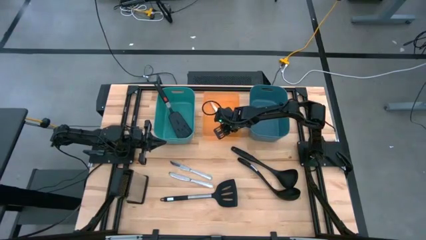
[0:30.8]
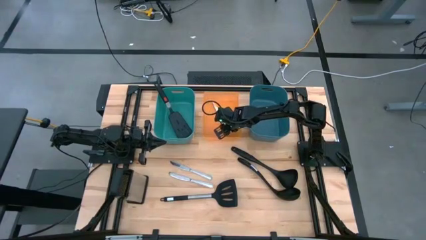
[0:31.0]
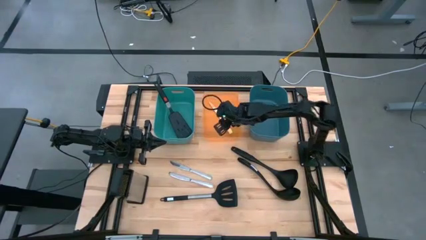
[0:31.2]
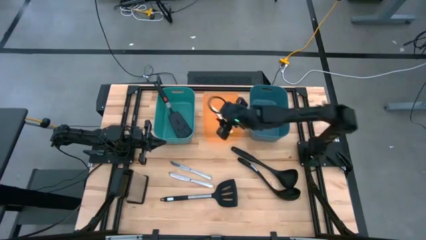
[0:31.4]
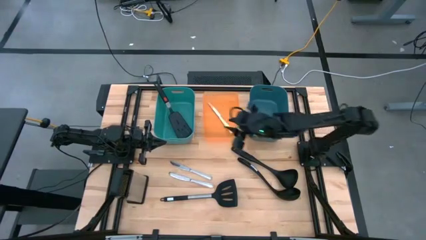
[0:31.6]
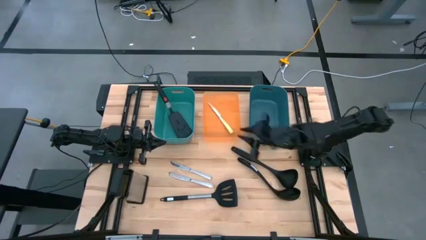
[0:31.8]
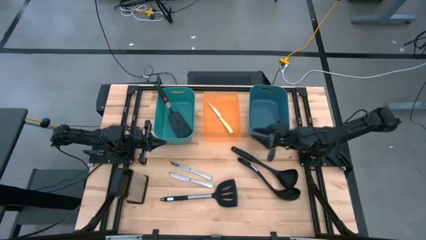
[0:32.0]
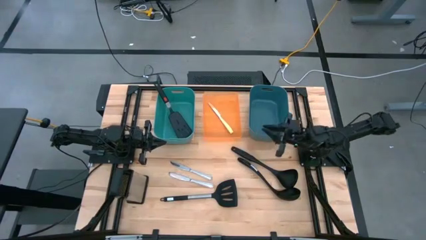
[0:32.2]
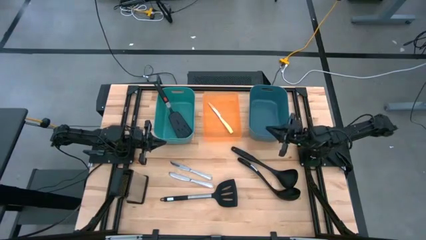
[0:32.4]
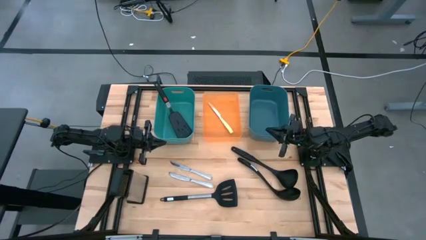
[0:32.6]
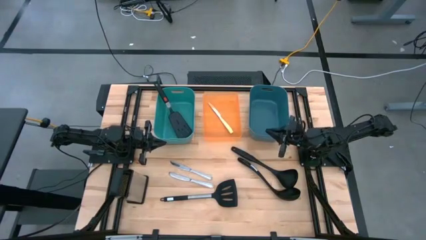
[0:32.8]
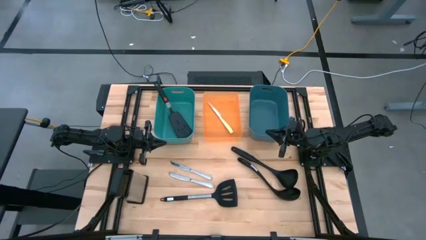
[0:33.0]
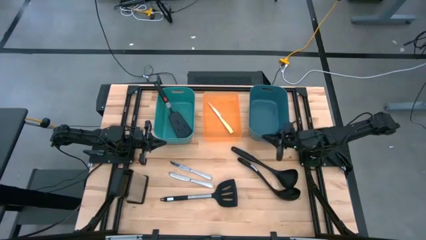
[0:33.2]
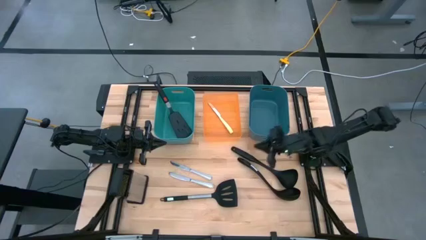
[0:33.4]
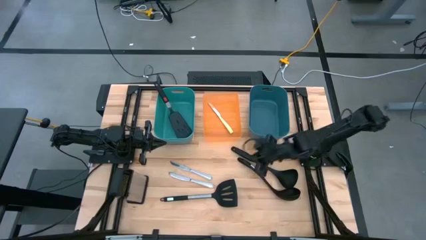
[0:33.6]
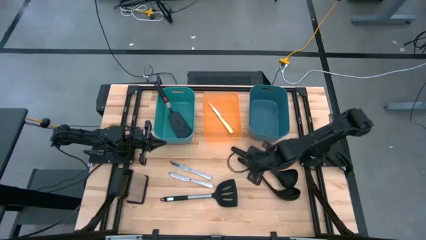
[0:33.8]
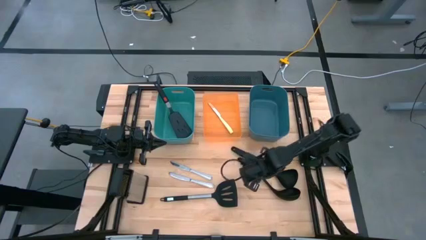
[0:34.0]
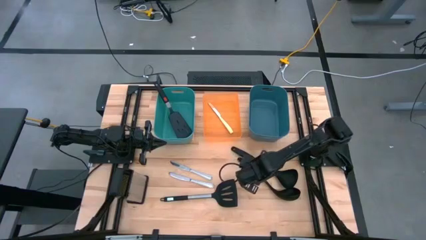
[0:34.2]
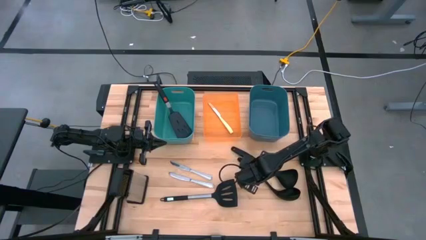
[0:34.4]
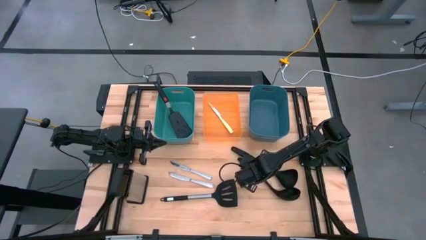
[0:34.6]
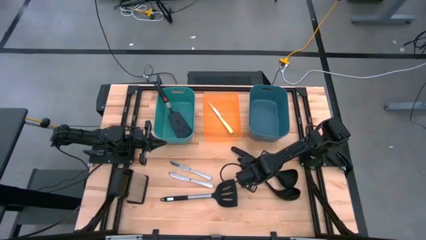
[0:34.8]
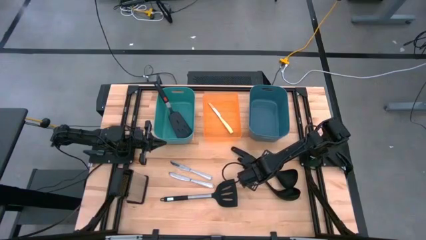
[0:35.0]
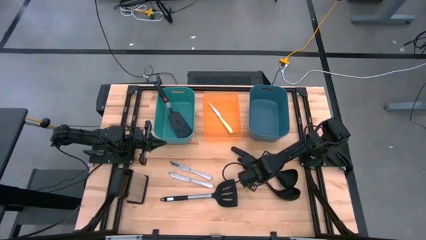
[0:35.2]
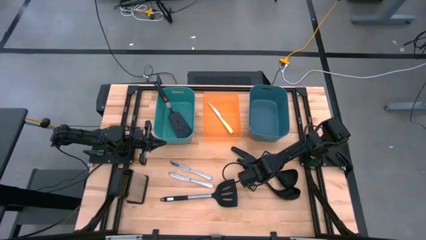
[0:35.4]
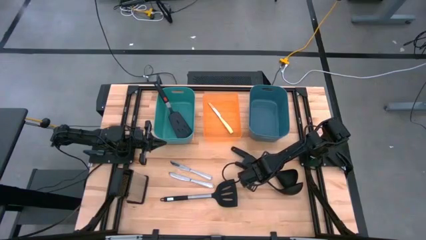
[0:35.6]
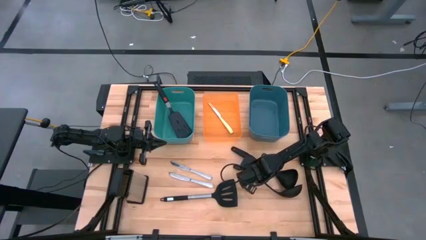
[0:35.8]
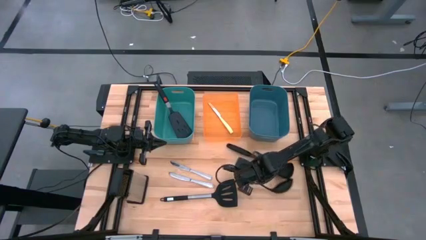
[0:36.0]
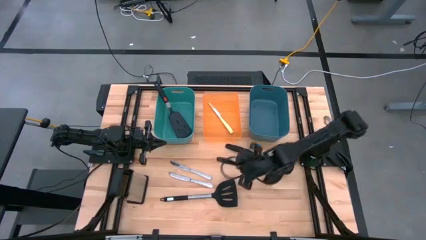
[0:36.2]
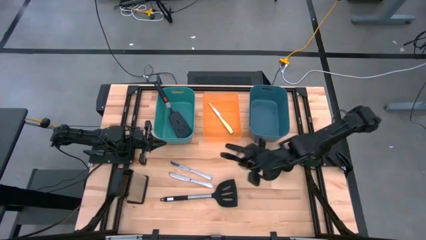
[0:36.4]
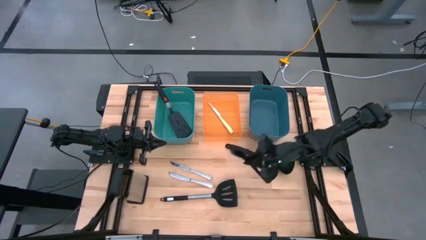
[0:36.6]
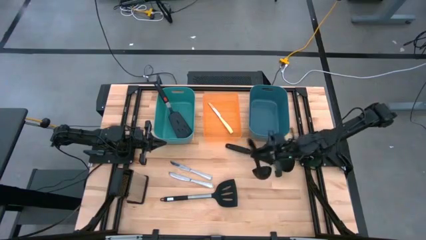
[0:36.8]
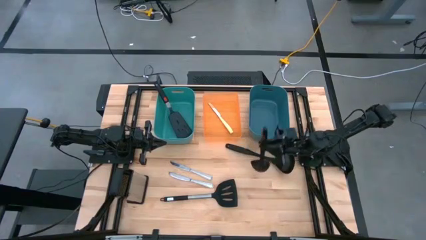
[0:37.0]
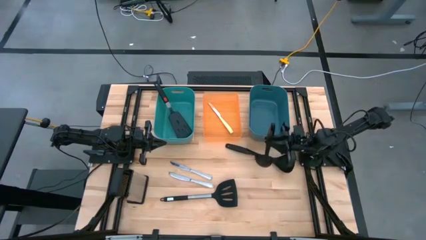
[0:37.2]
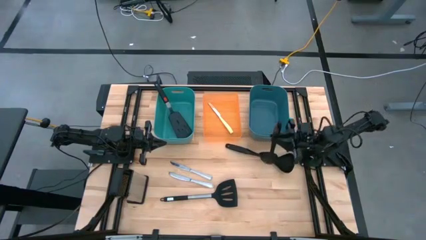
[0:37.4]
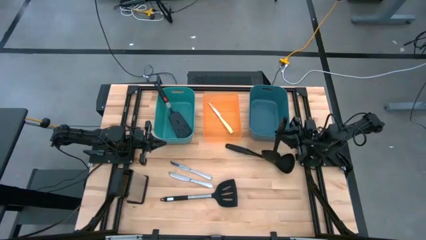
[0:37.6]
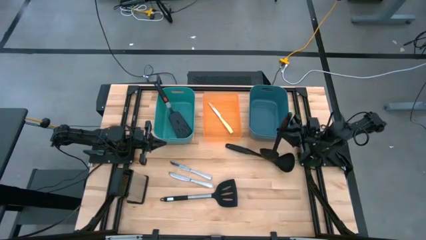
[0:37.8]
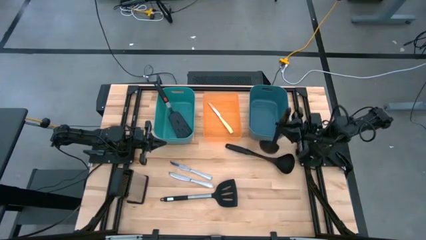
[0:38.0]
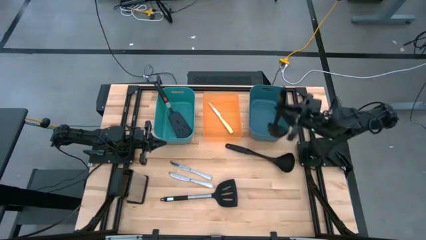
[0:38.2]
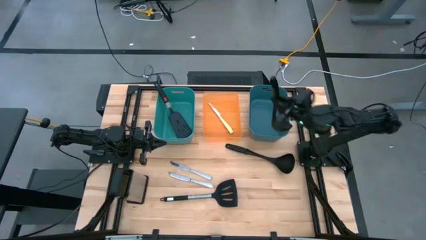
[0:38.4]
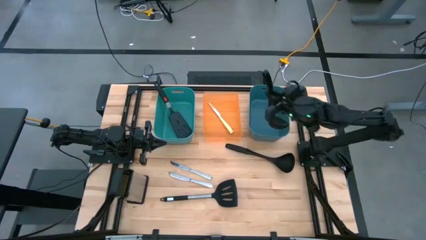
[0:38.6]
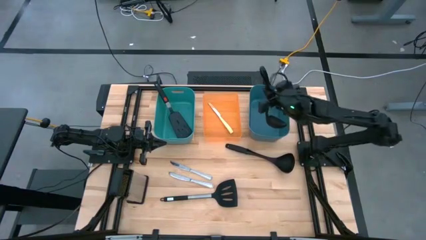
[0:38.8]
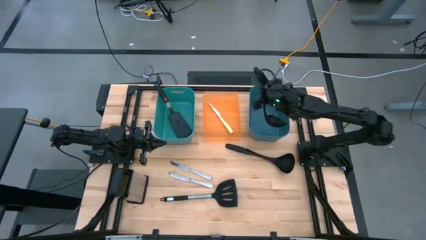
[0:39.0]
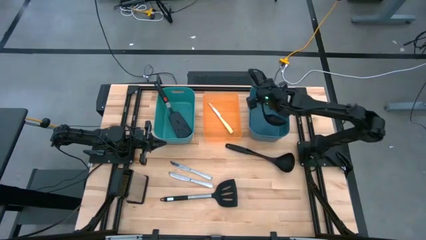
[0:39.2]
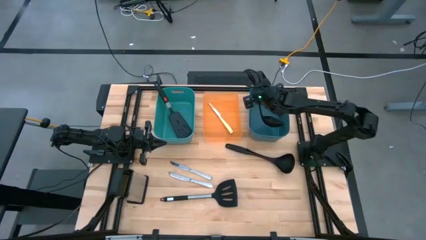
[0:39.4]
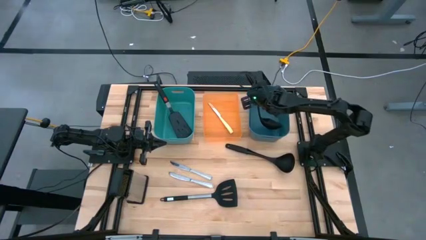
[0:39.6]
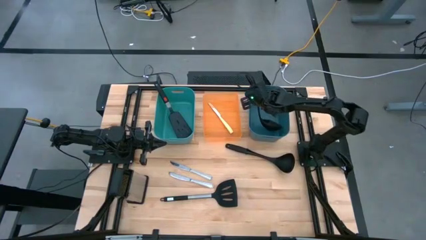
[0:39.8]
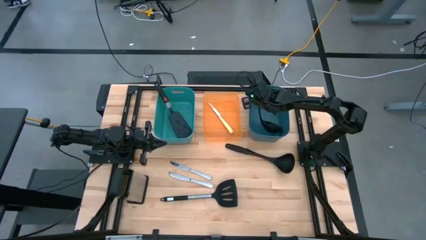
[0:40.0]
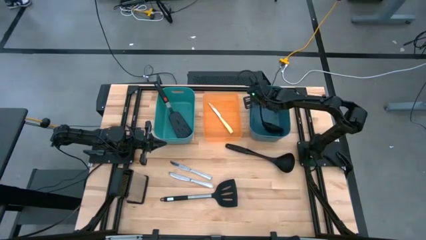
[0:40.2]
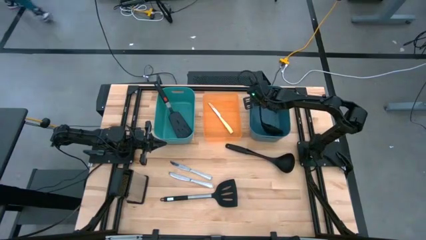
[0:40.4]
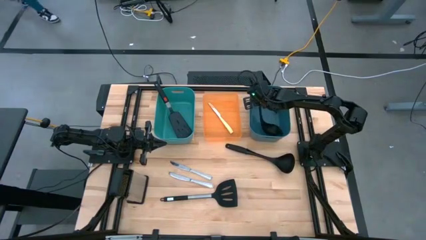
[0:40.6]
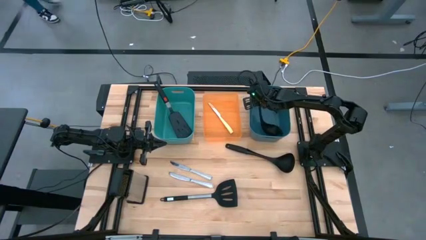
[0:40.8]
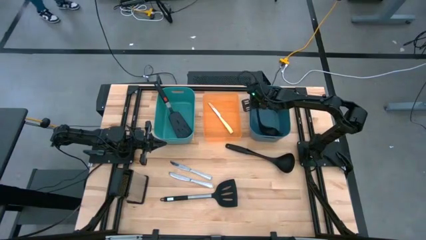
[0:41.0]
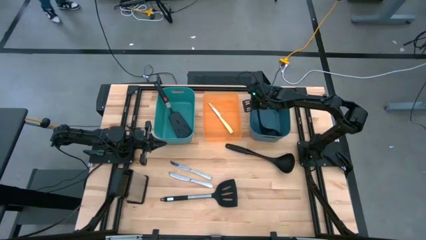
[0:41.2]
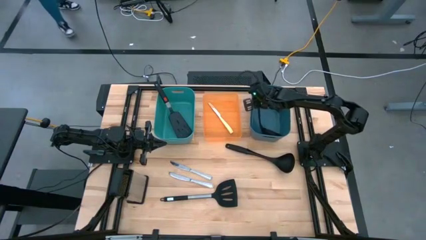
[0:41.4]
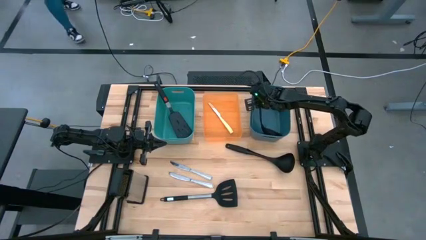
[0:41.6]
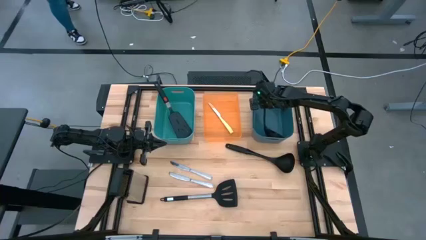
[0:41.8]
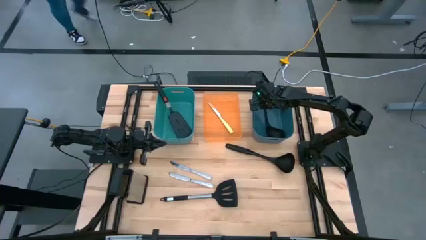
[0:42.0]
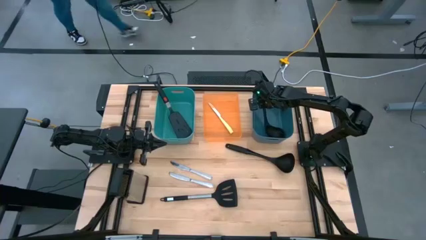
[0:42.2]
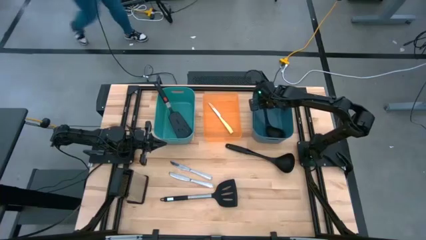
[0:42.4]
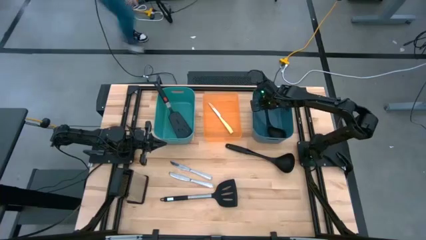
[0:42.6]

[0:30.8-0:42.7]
Task: Pick & Place Kitchen Items
Put the bottom black serving spoon into the blue bin

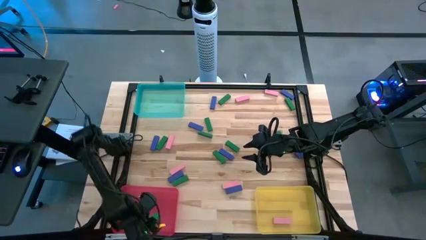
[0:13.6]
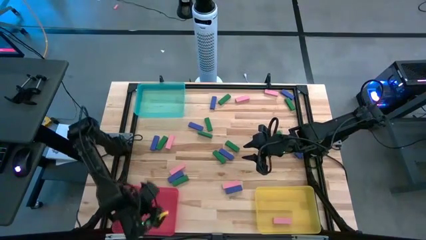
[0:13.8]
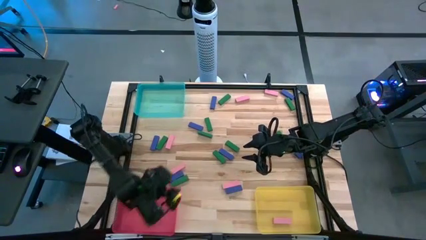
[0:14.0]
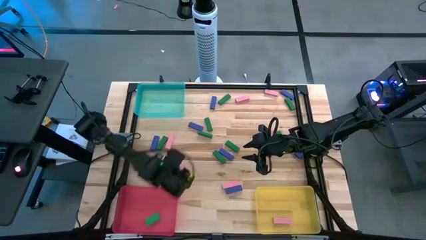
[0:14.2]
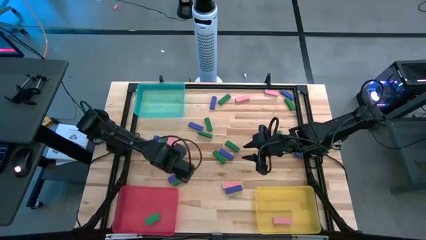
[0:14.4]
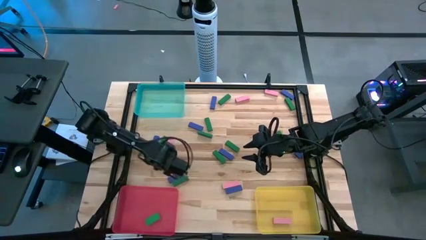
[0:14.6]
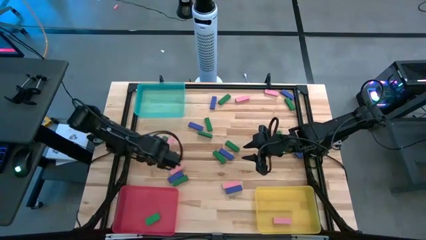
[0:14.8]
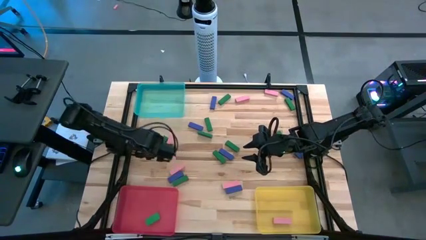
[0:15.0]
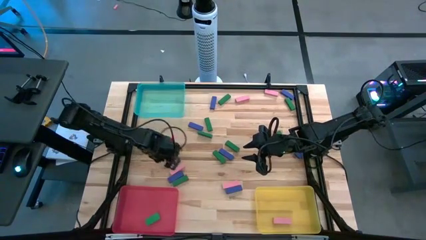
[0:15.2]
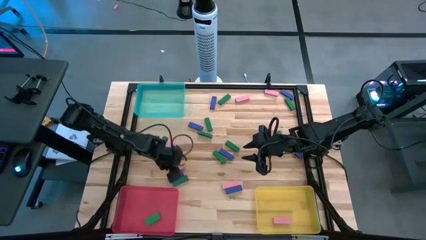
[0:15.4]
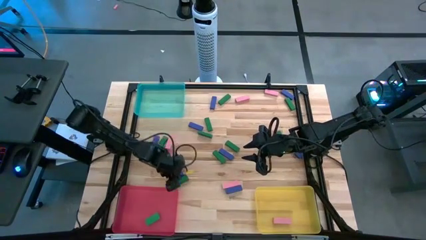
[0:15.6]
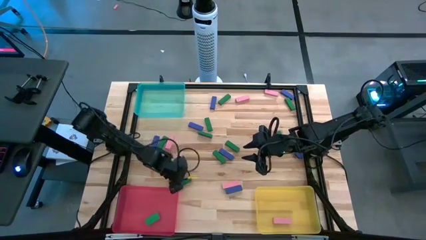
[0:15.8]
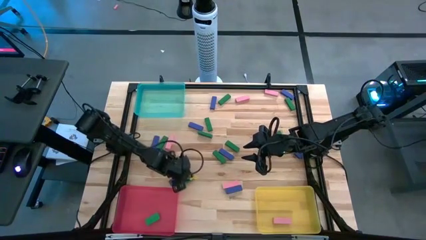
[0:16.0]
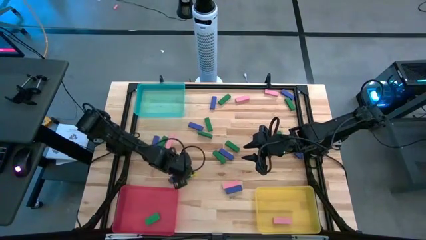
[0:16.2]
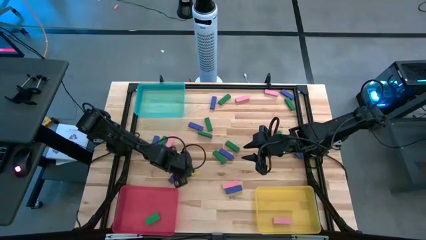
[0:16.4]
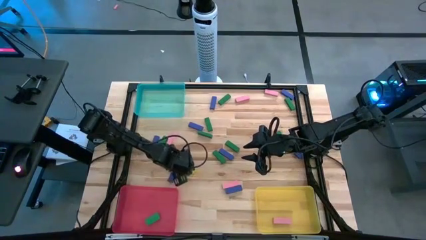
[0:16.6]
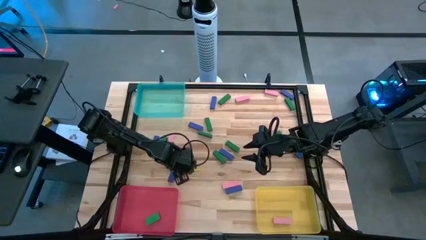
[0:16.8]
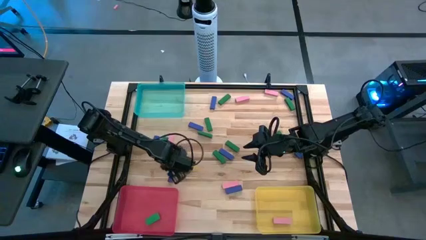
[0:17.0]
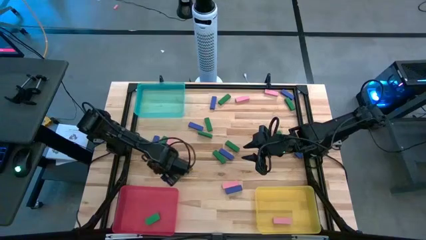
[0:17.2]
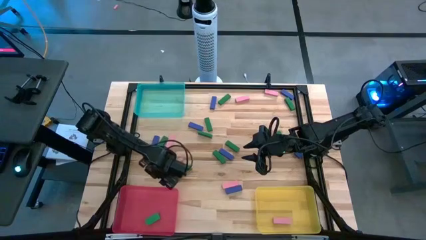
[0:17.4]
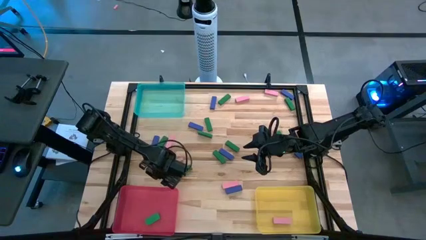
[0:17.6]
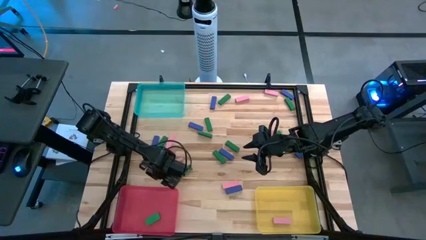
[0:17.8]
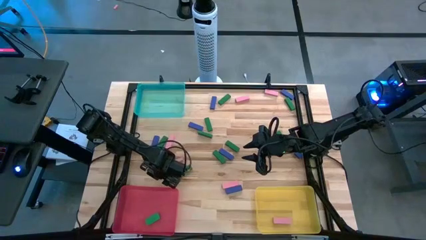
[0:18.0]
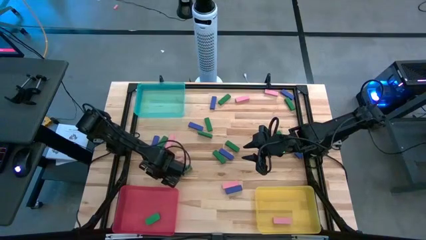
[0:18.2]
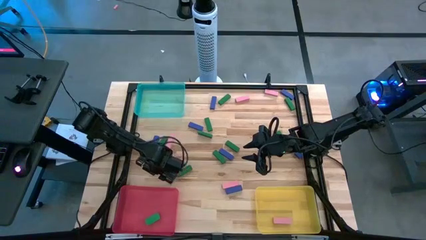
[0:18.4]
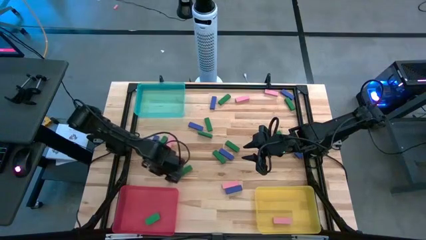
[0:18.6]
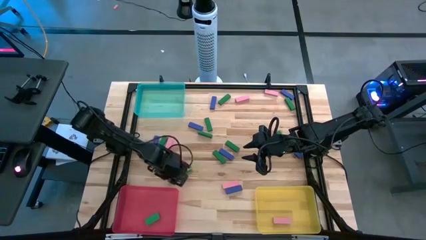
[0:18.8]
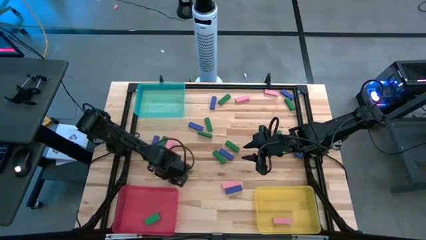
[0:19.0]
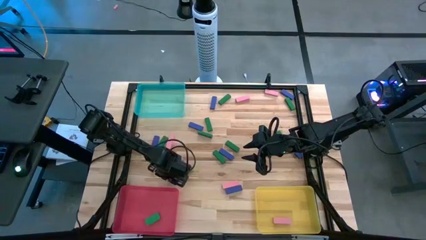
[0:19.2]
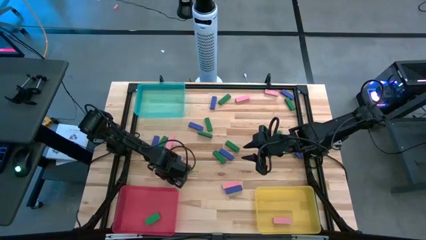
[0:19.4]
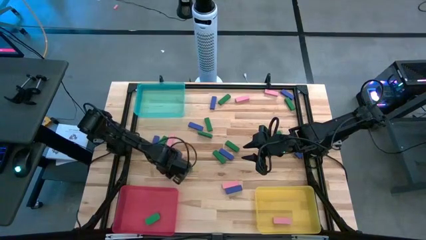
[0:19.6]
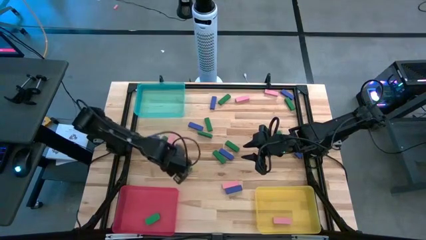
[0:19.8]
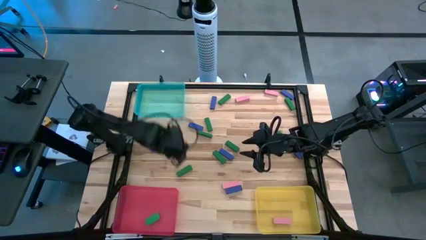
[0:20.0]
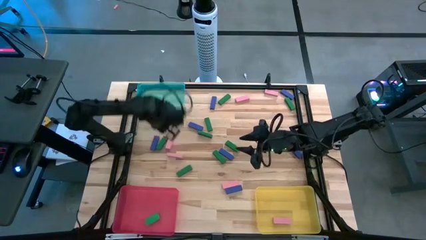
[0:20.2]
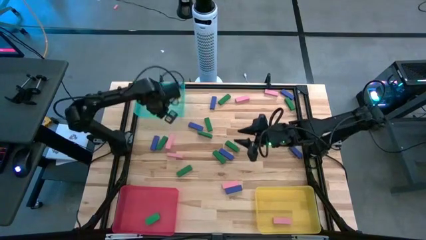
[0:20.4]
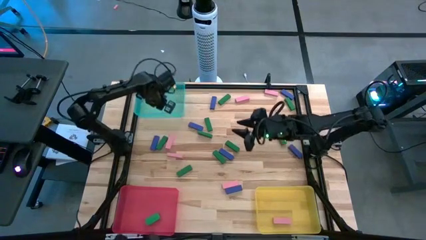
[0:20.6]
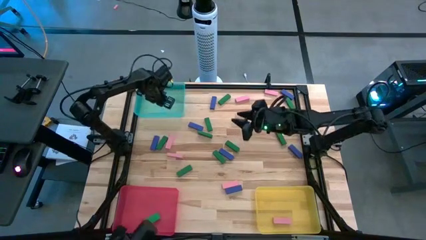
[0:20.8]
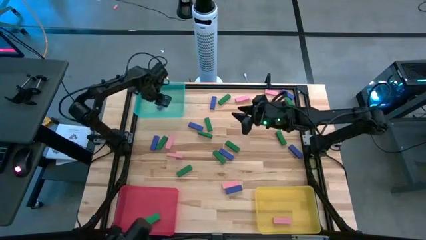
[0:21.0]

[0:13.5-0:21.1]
Task: Sort blocks
Put the blue block into the blue bin
